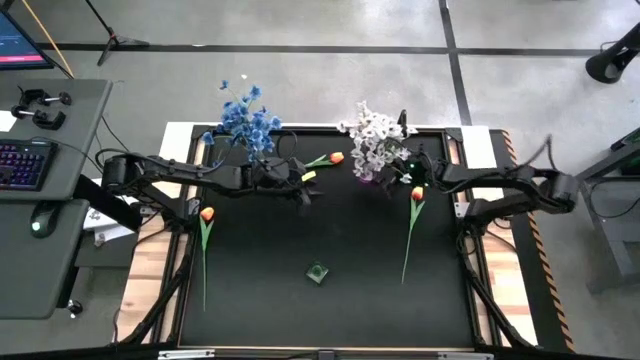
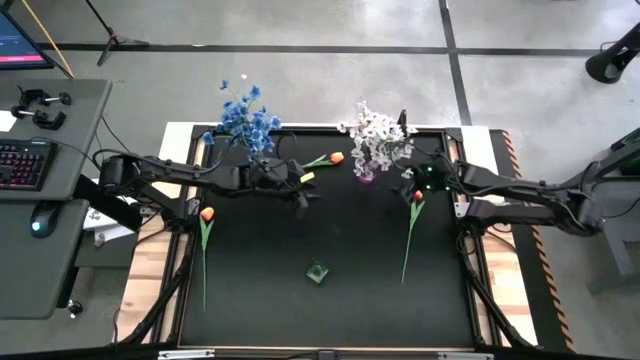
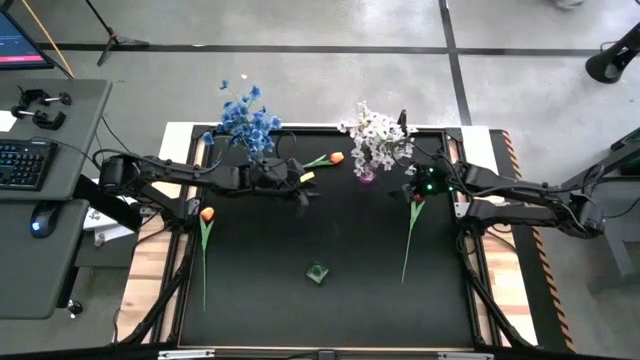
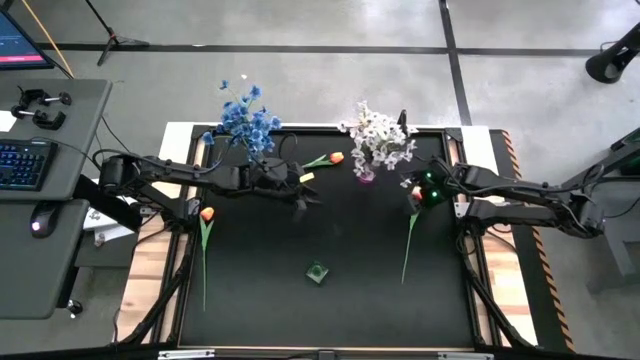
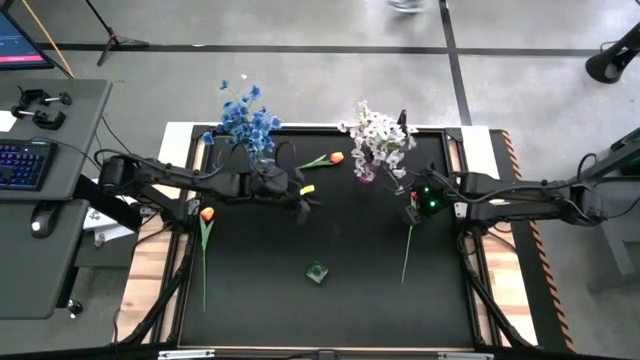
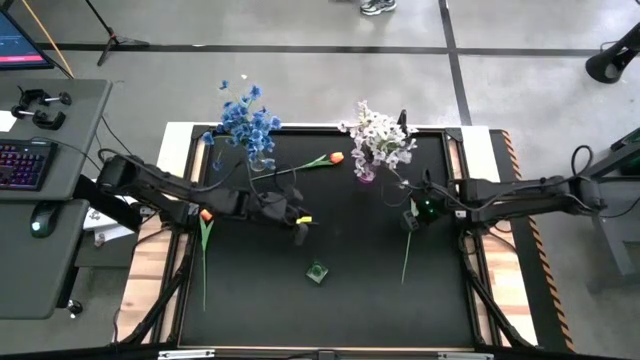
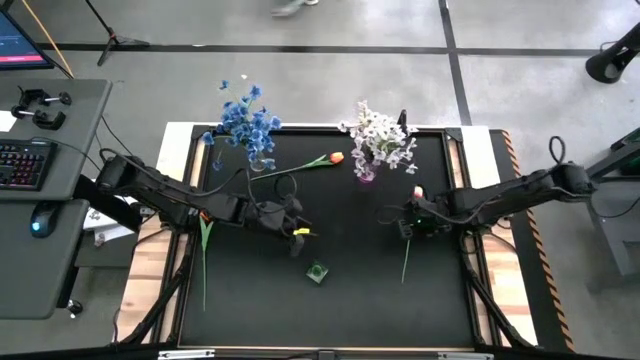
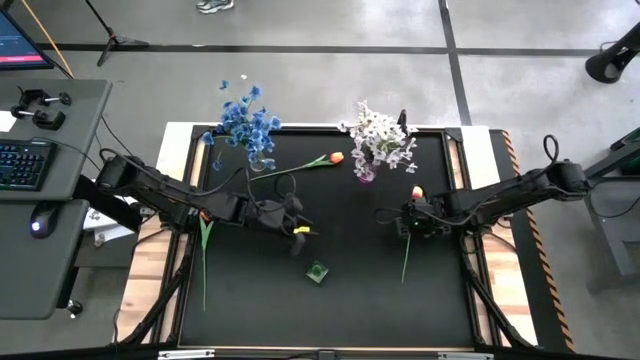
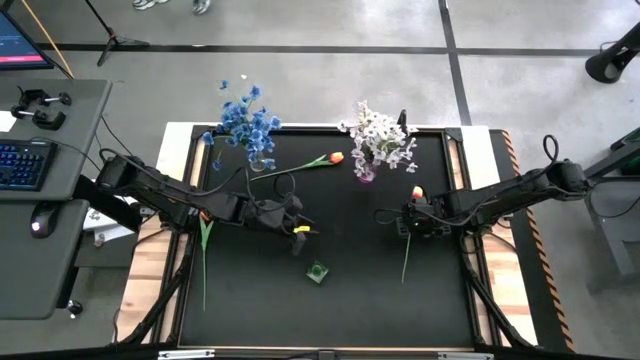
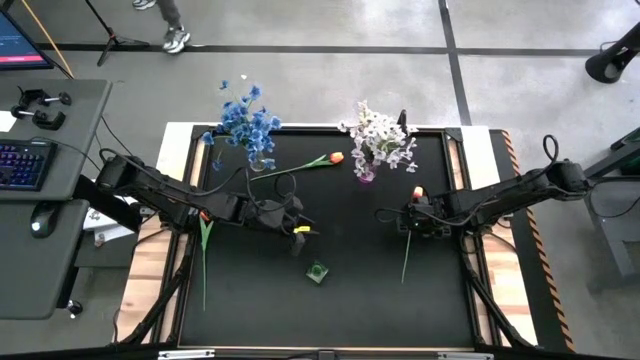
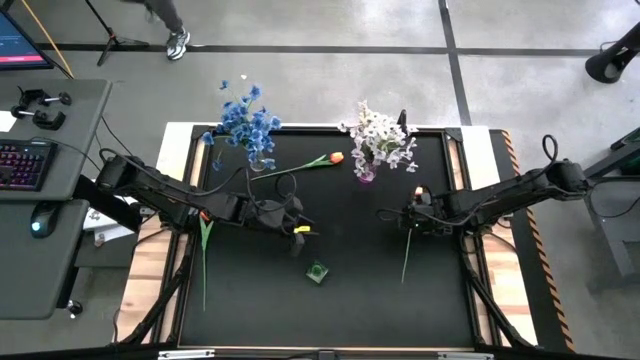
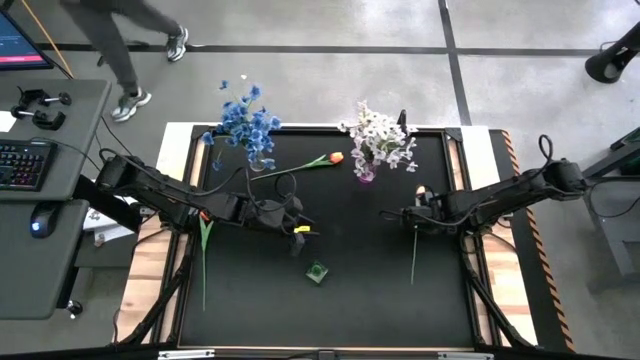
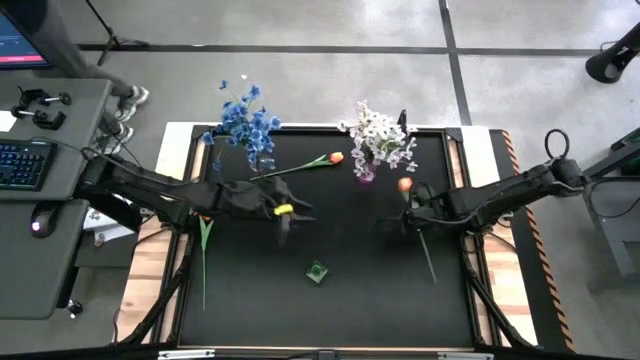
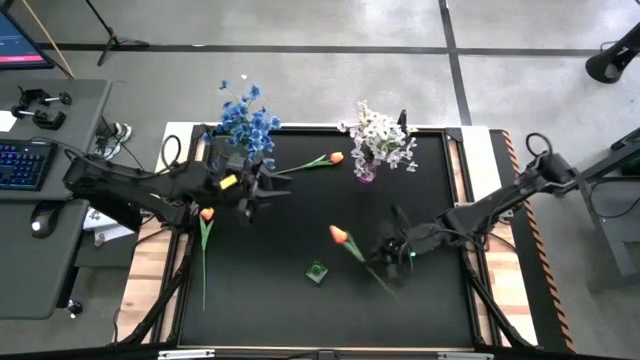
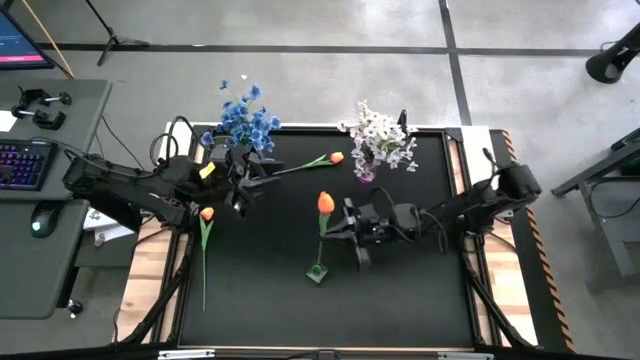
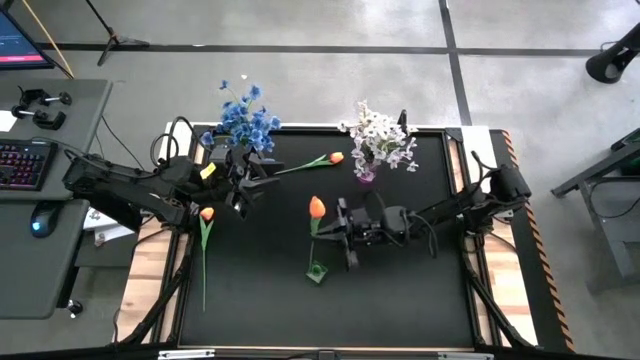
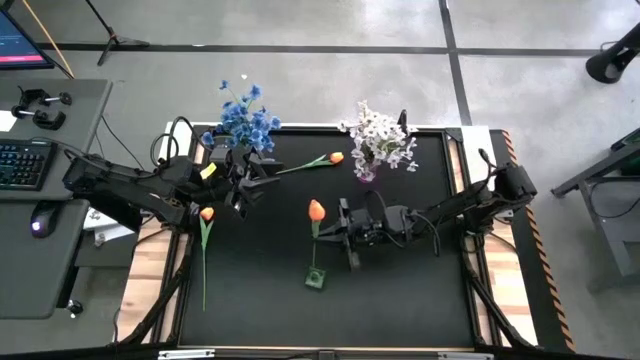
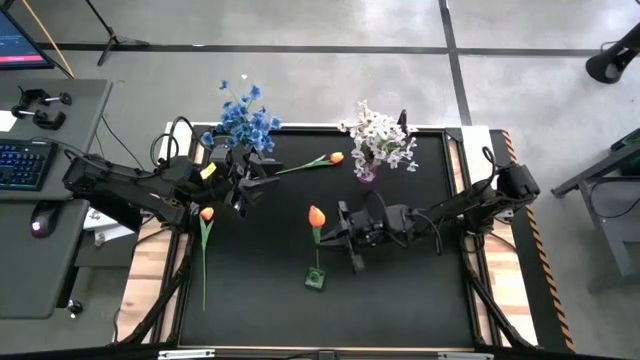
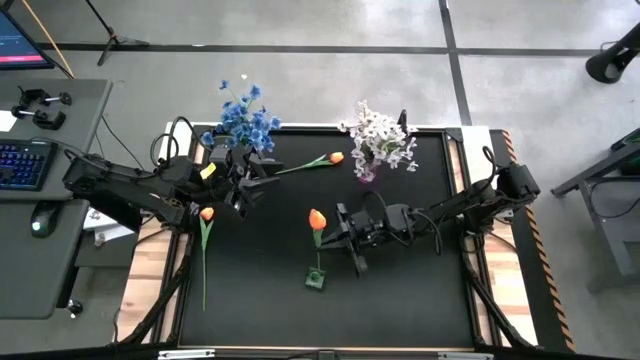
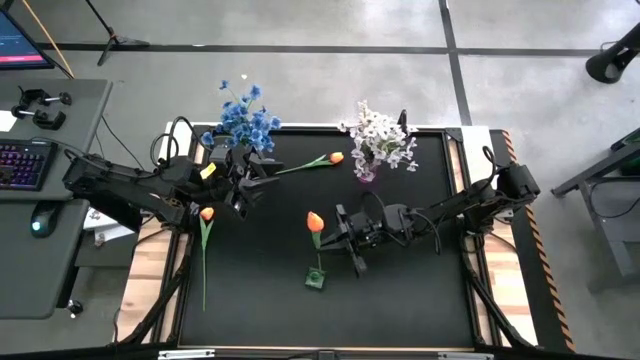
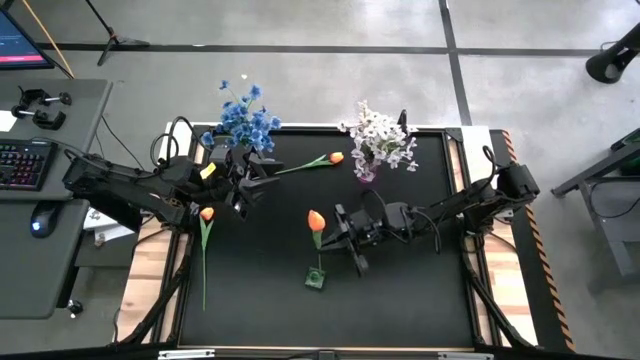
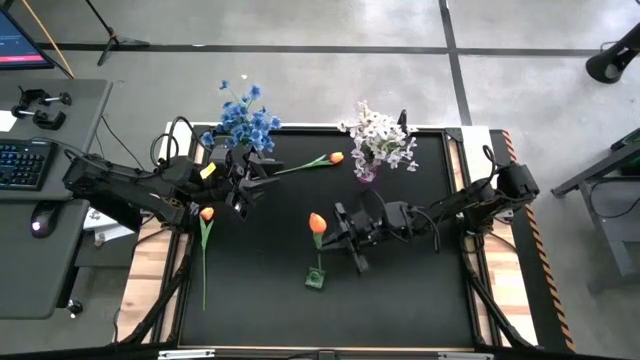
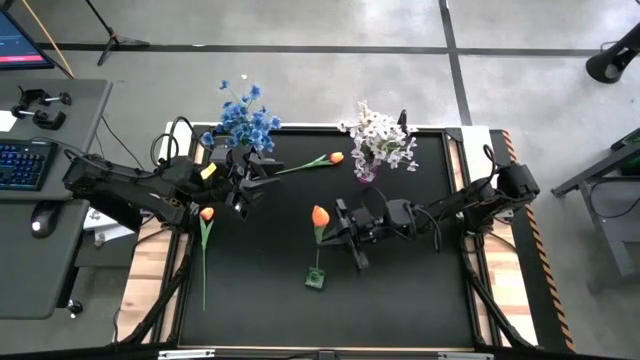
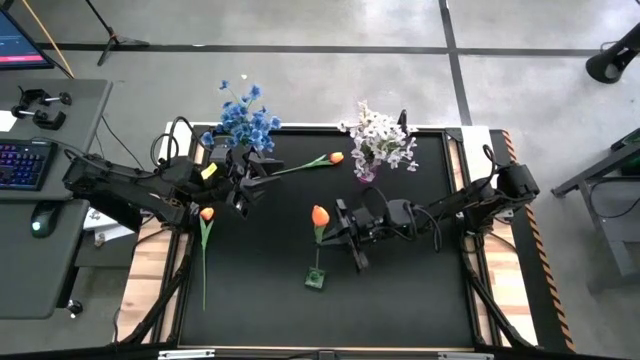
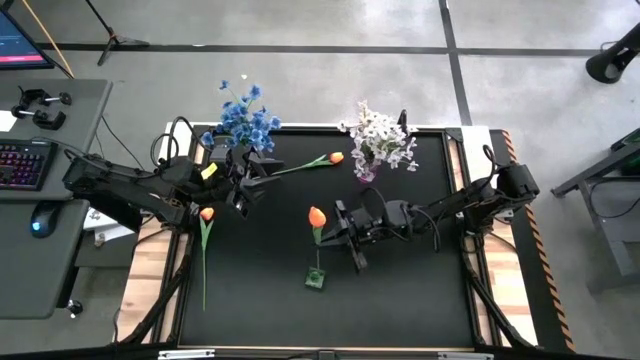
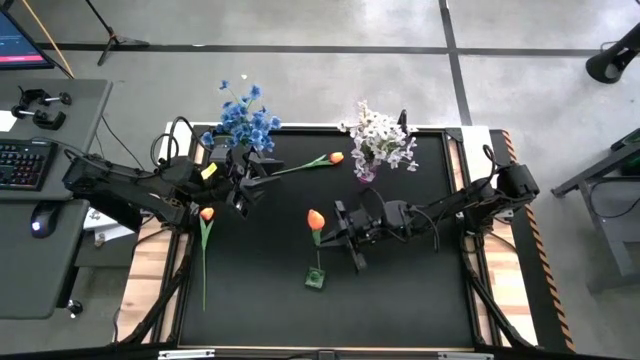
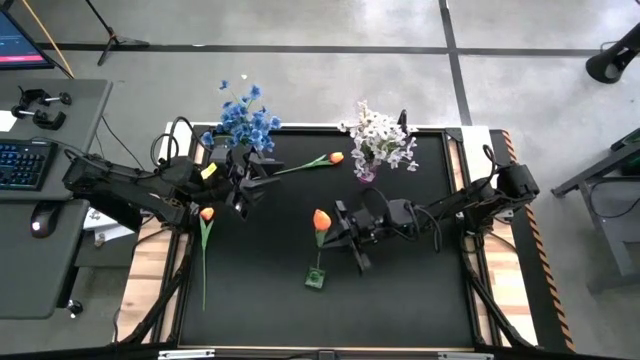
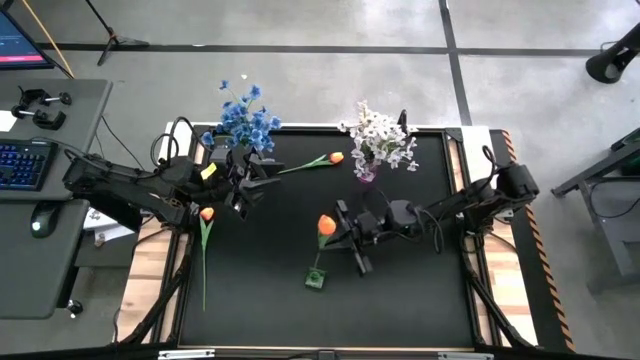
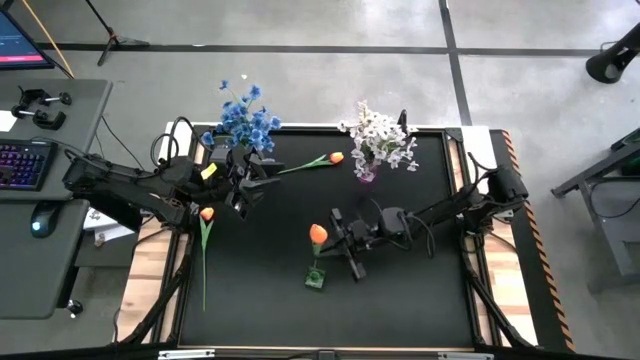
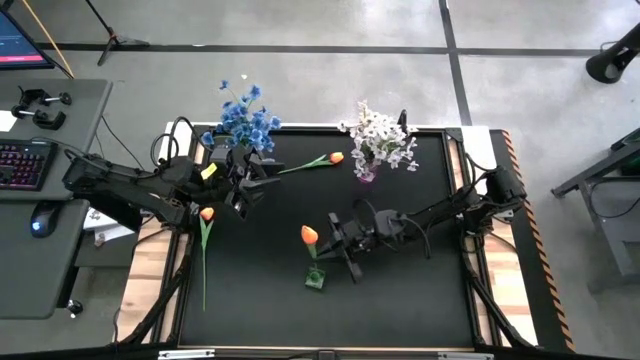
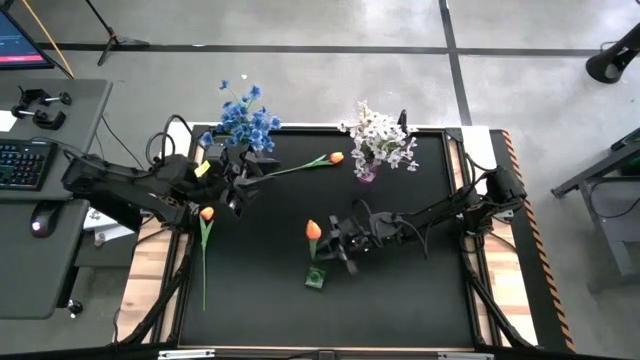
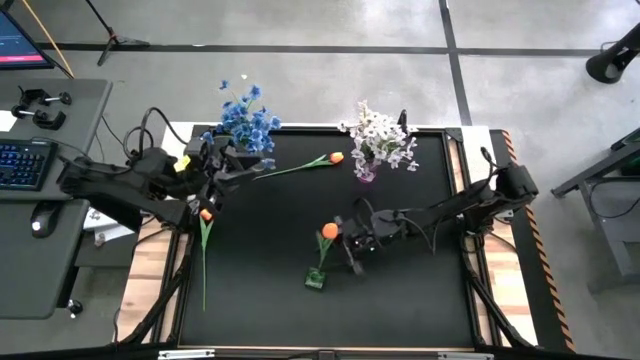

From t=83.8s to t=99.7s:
Task: Sort flowers into vase by color
Put the bottom right orange flower into the green vase

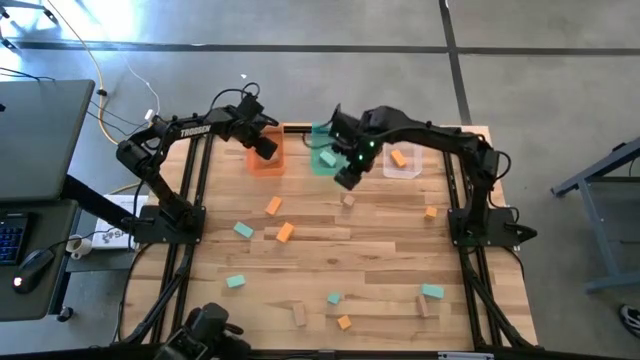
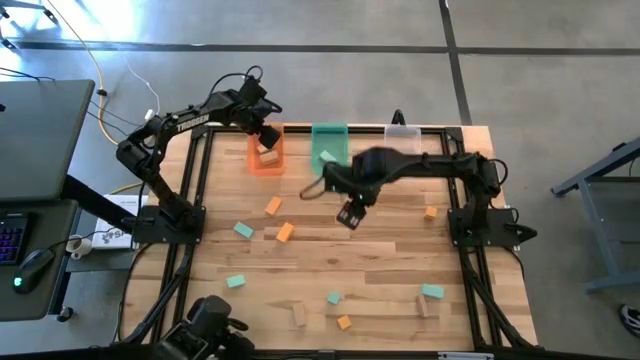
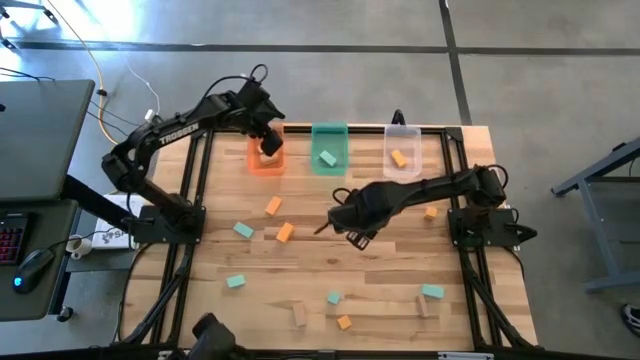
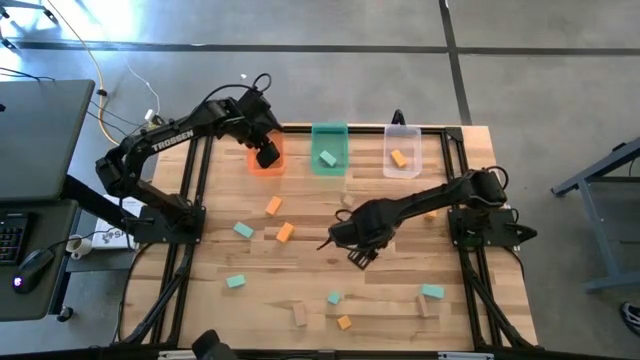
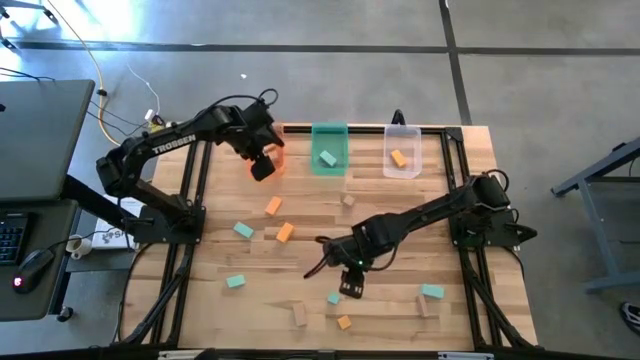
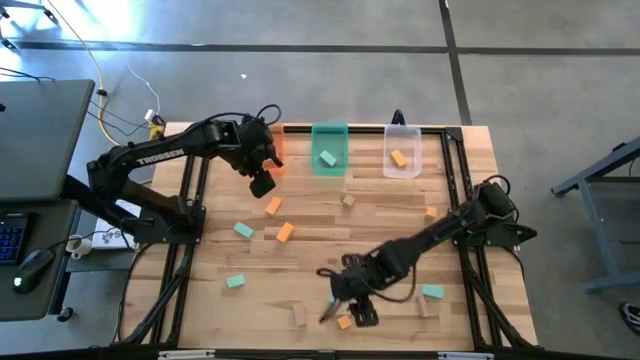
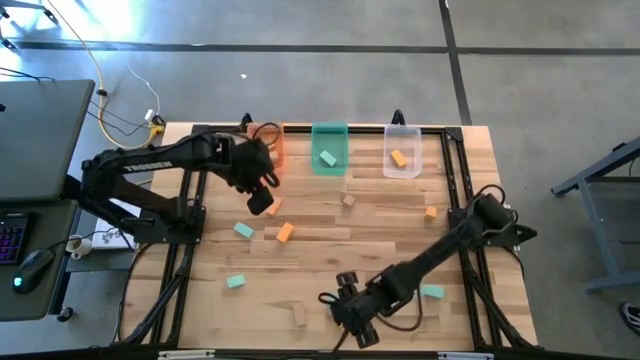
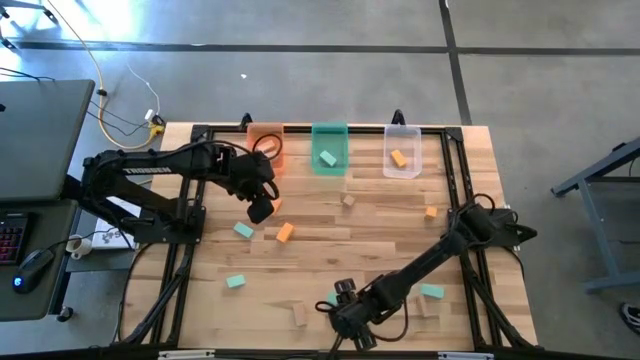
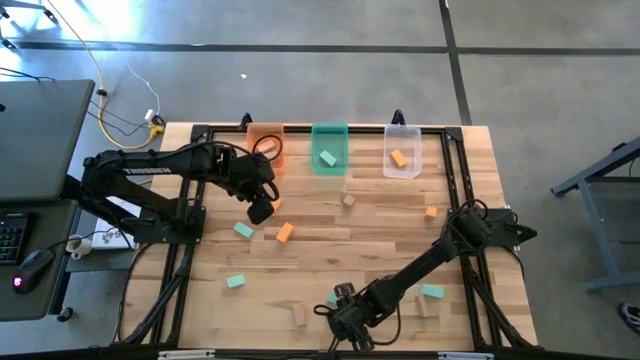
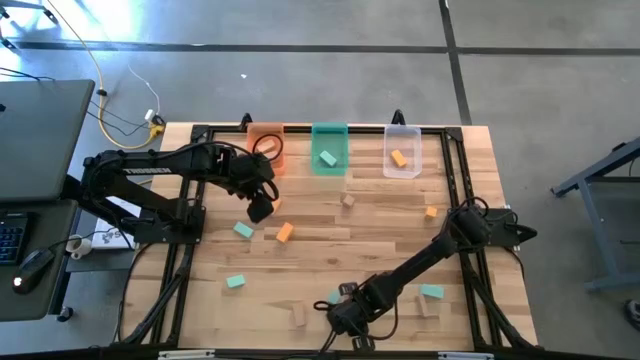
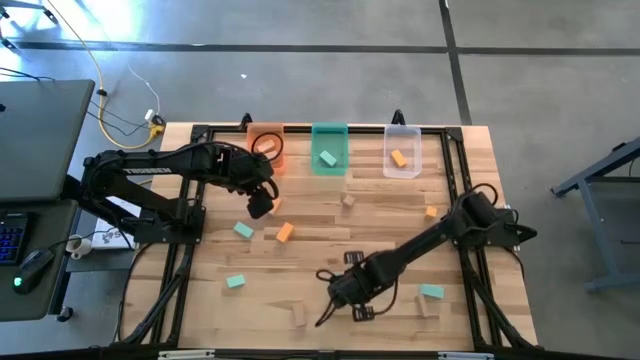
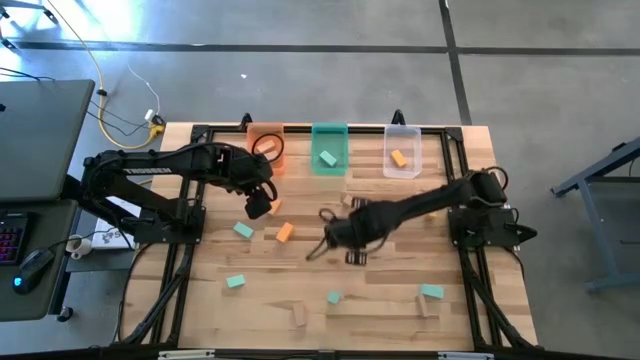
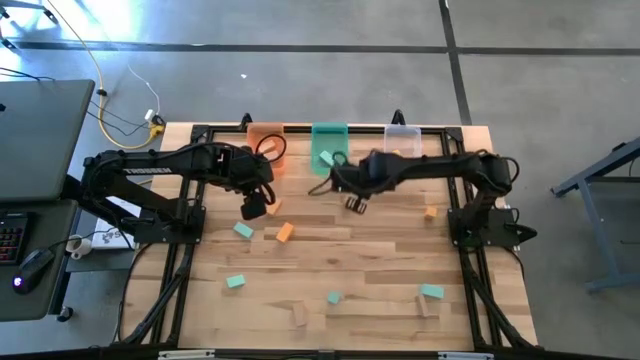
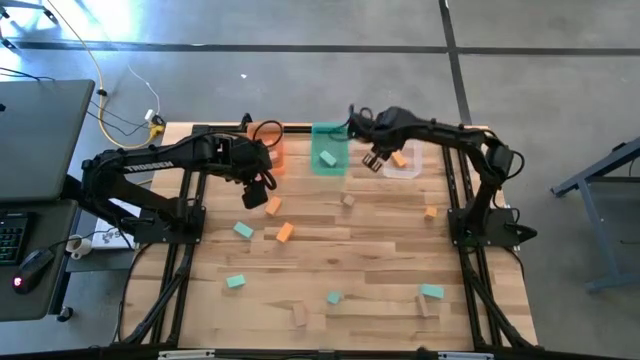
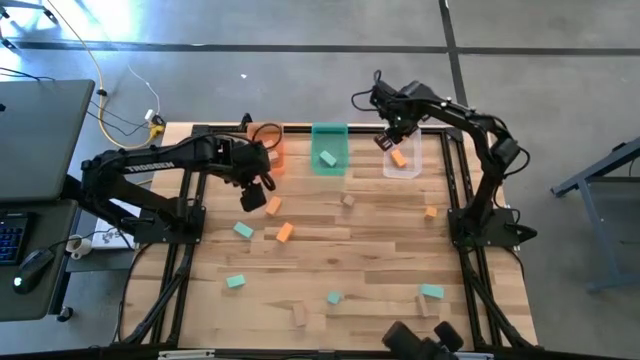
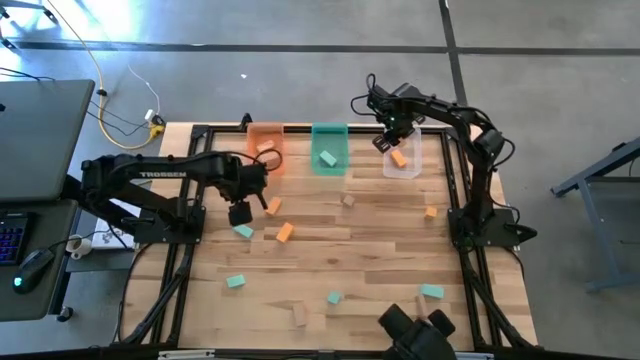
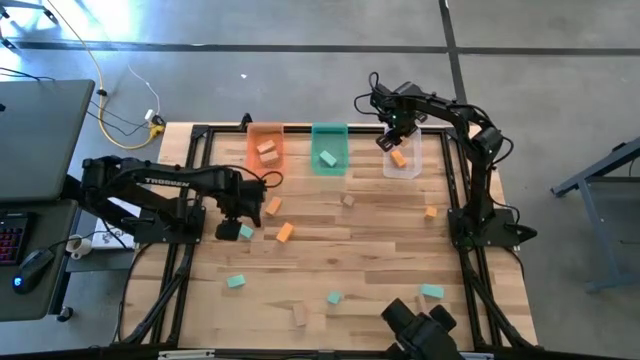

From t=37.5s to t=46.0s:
Task: Sort & place blocks by color
Put the yellow block into the transparent bin
